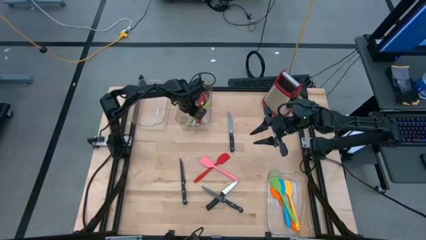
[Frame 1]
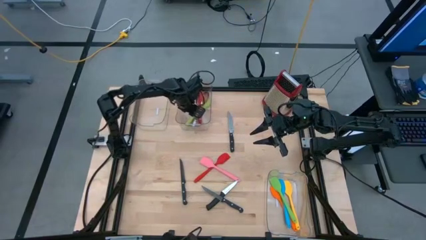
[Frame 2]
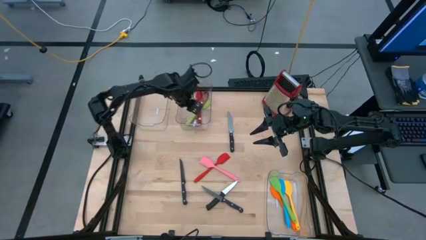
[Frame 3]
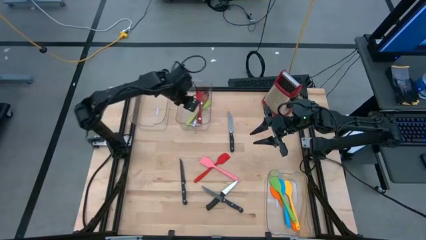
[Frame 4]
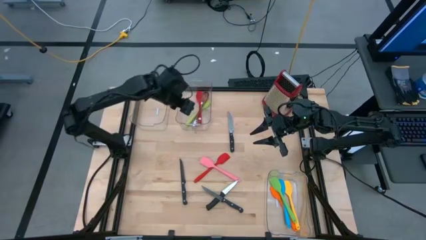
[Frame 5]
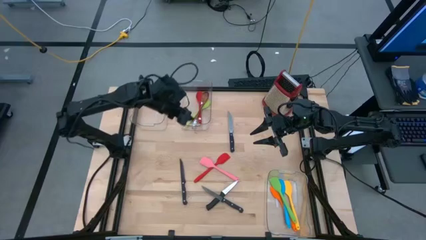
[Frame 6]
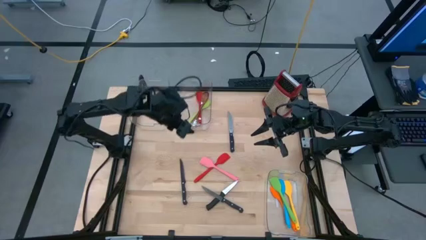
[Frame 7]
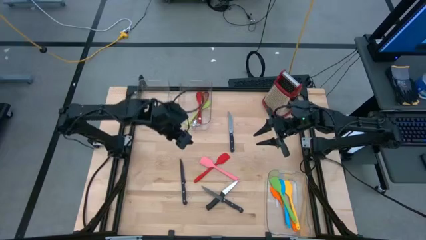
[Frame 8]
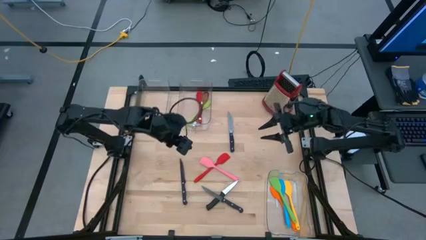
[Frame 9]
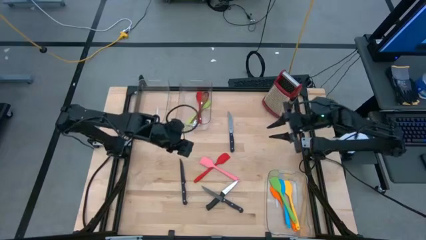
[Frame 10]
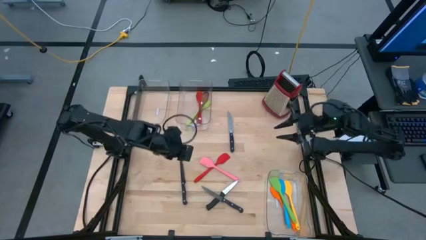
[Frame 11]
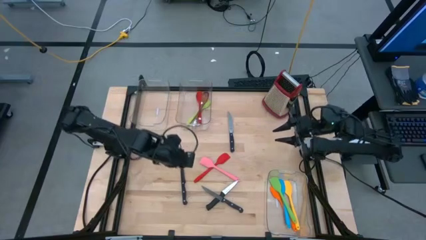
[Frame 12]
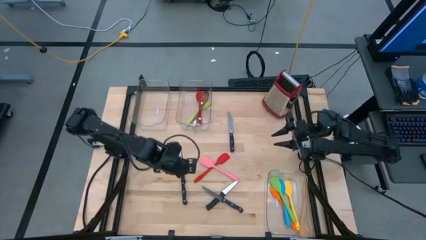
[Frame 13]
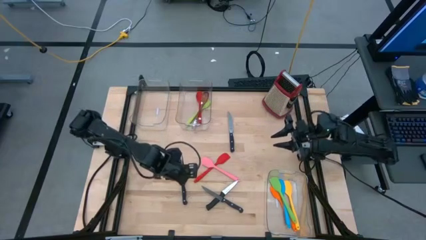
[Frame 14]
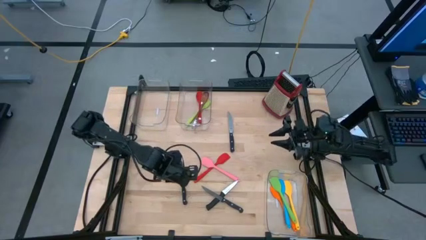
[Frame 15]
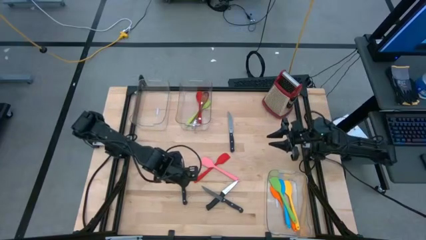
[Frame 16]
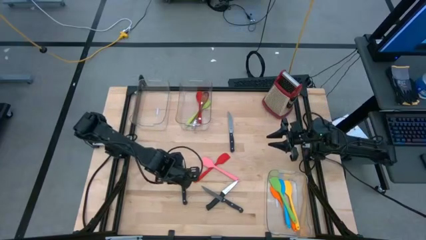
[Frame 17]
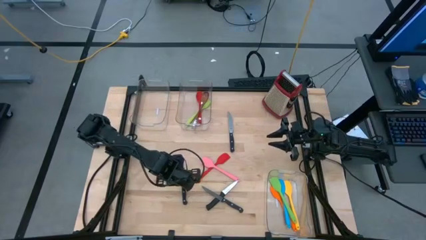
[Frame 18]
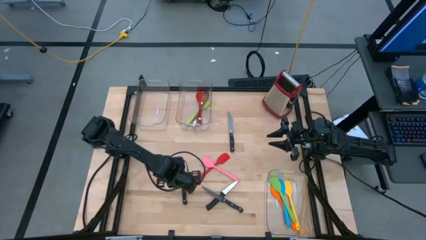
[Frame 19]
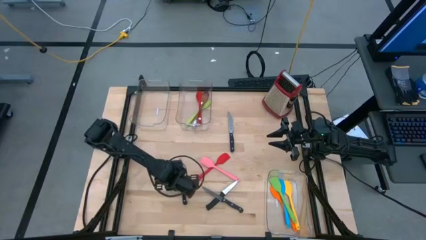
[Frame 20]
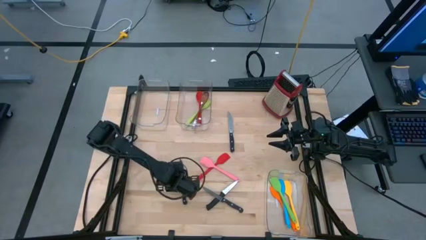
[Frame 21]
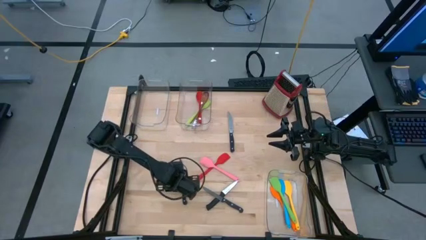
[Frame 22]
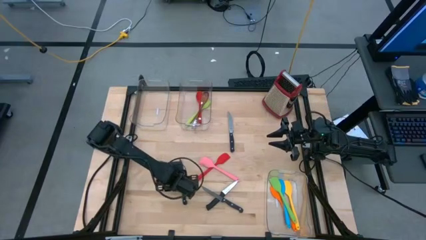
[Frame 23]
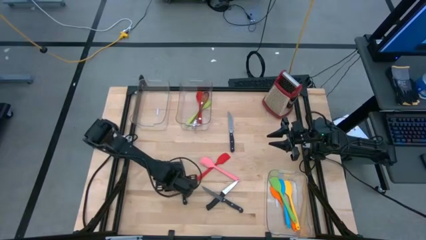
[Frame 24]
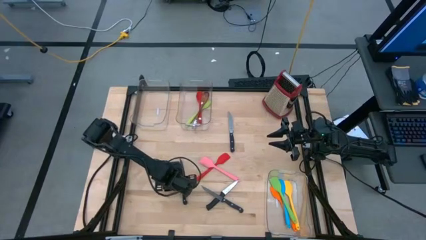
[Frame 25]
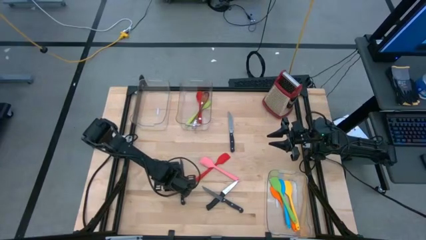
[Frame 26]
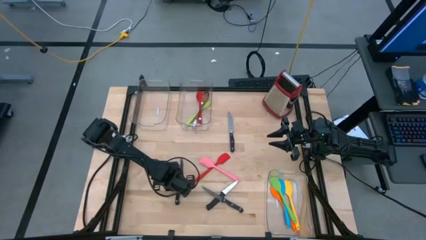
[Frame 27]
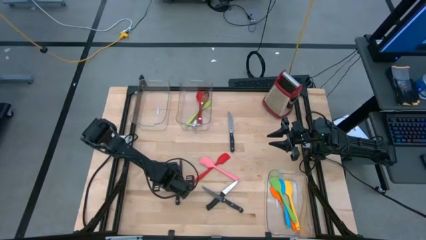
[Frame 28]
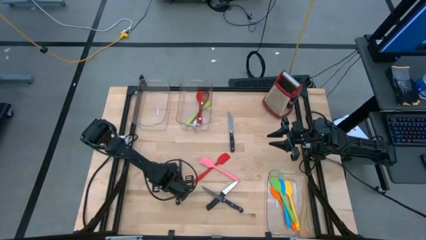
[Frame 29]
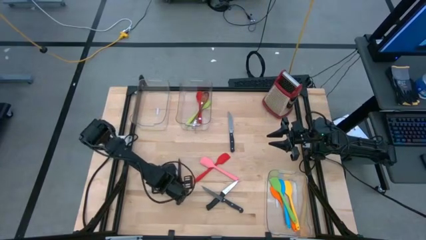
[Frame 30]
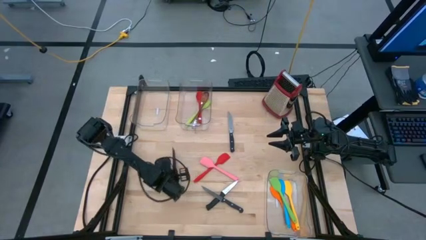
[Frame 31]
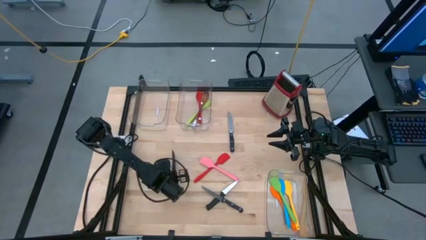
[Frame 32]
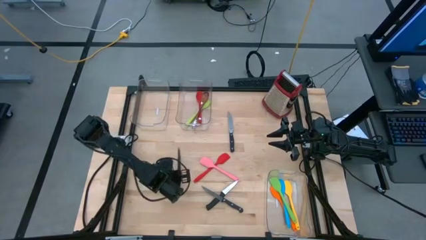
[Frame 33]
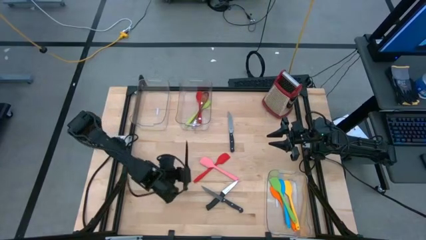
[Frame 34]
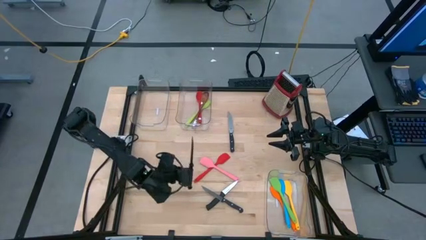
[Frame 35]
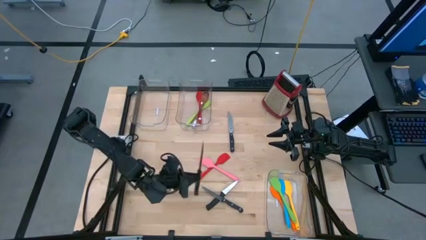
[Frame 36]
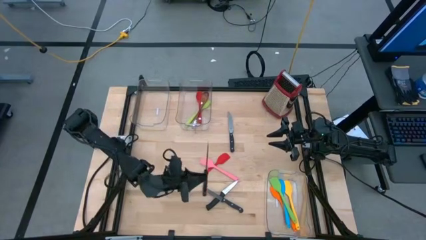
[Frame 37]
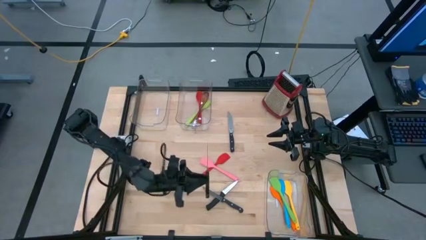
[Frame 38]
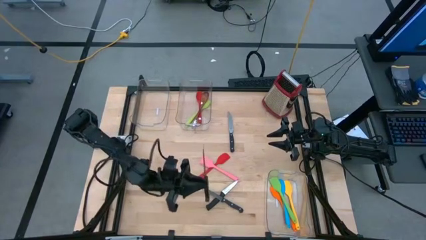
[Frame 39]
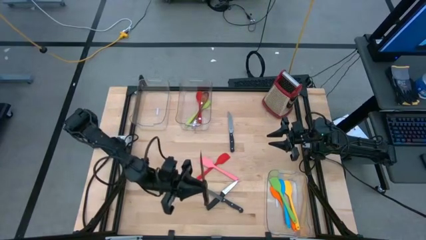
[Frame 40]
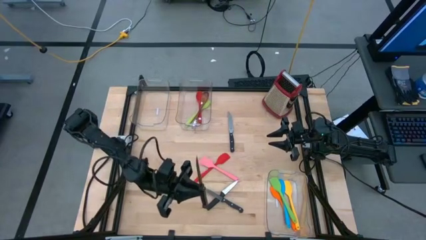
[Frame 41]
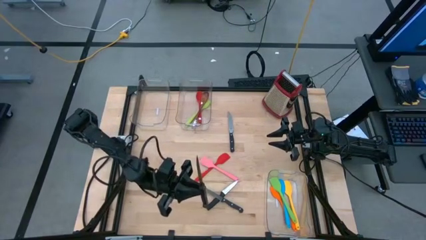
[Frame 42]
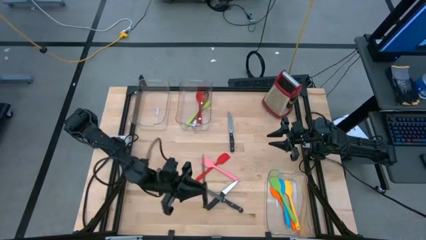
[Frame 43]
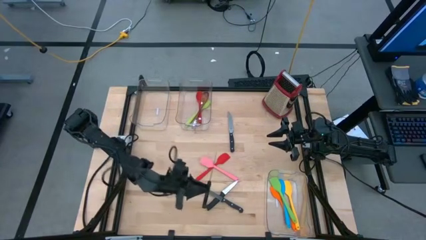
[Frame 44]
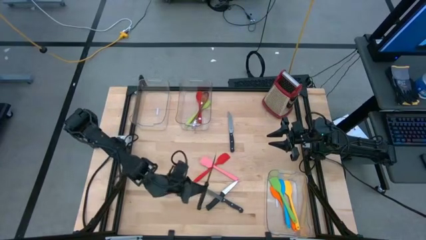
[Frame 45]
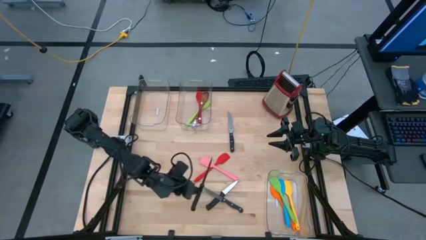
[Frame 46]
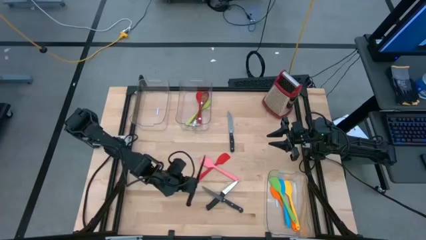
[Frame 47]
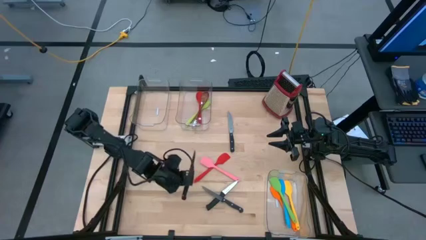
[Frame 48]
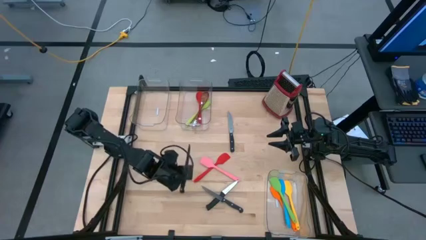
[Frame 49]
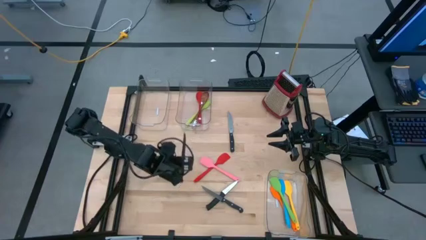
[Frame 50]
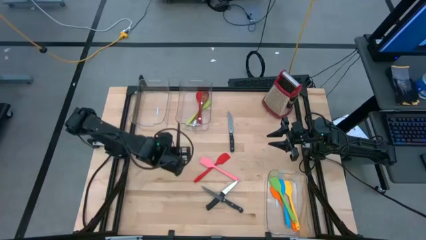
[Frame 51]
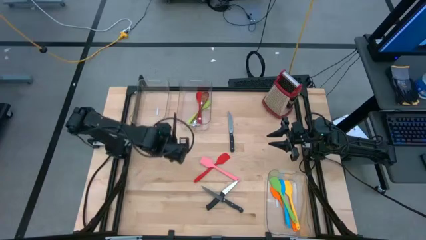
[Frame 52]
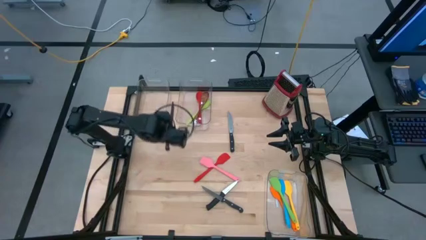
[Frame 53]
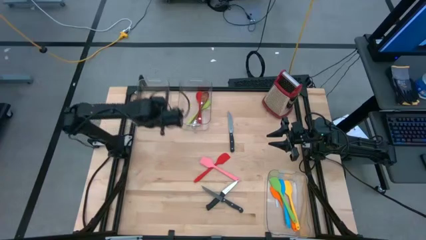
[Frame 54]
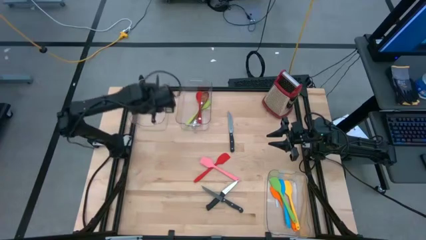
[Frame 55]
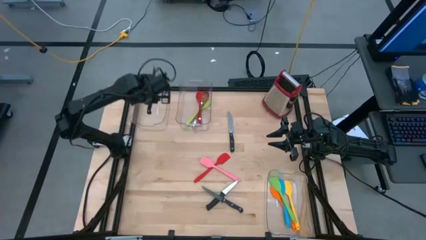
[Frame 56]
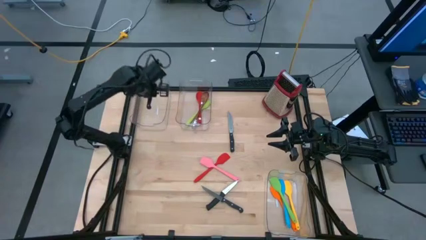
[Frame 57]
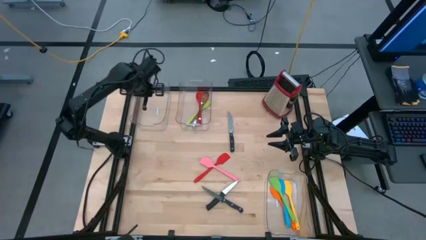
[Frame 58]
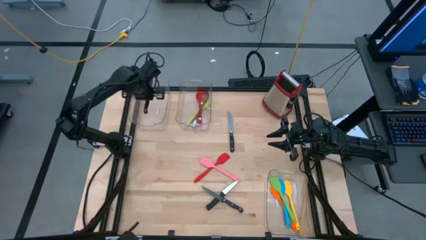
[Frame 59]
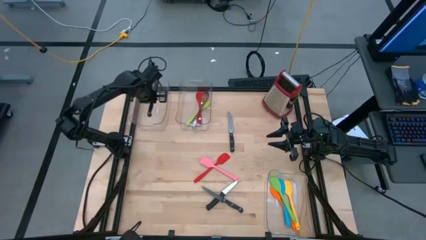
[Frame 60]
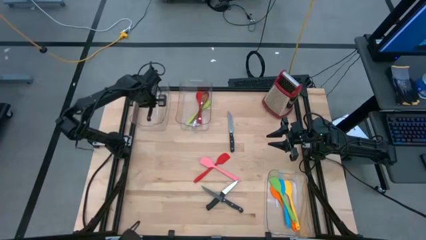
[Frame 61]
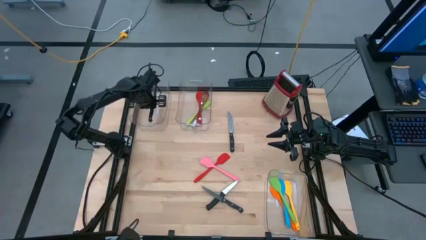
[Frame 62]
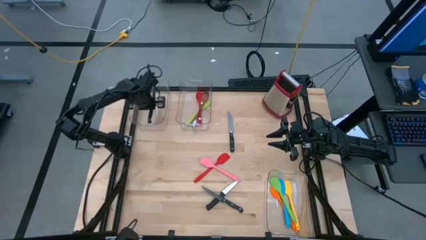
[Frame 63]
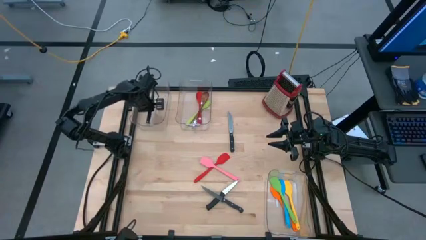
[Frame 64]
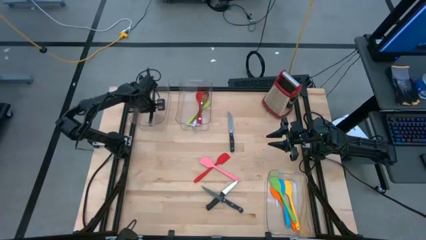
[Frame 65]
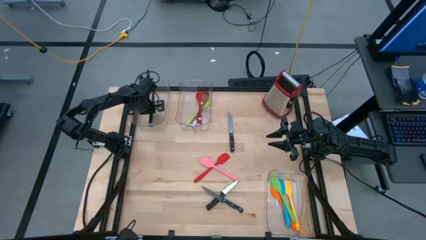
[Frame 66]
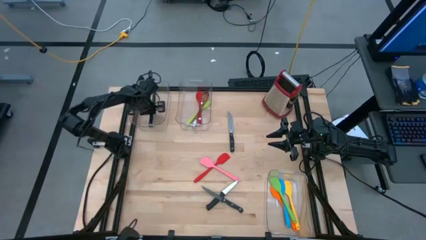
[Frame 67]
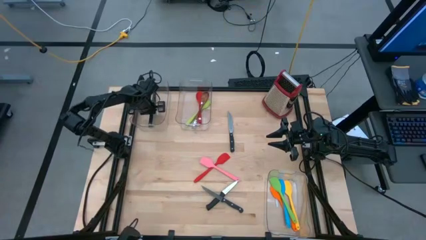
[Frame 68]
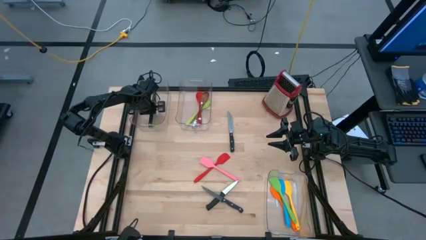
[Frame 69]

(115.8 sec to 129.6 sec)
Task: Pick & Place Kitchen Items
Put the black knife into the top left transparent bin
